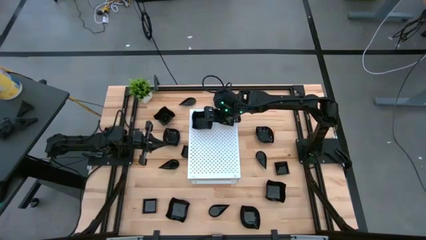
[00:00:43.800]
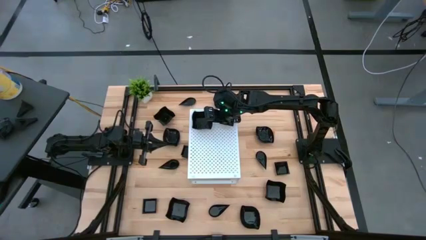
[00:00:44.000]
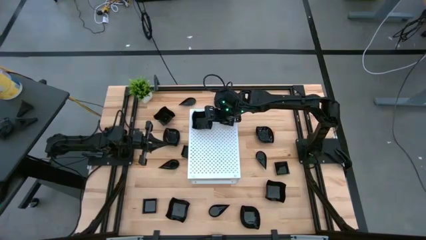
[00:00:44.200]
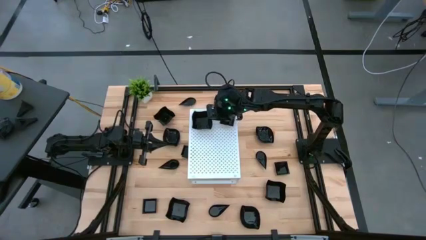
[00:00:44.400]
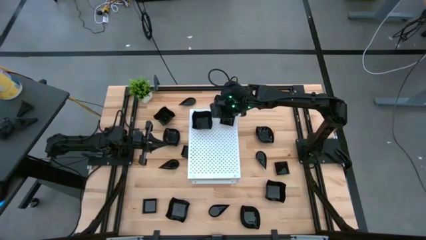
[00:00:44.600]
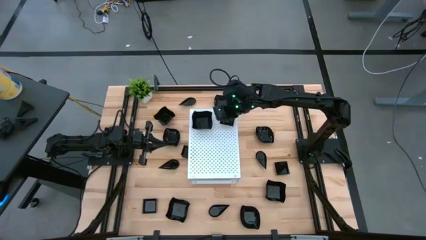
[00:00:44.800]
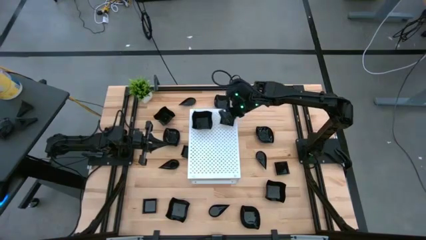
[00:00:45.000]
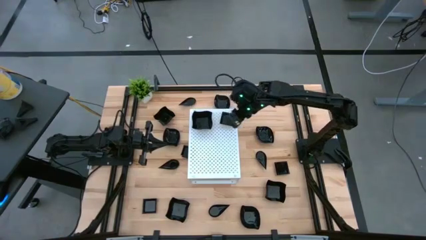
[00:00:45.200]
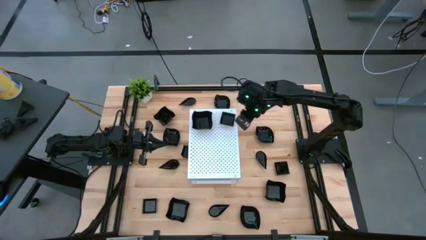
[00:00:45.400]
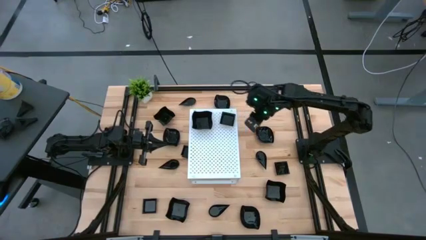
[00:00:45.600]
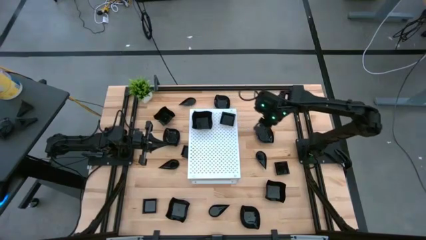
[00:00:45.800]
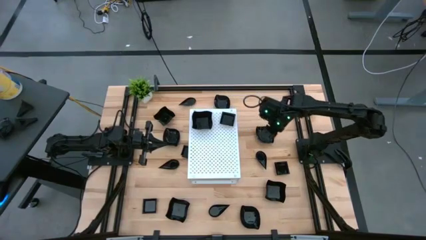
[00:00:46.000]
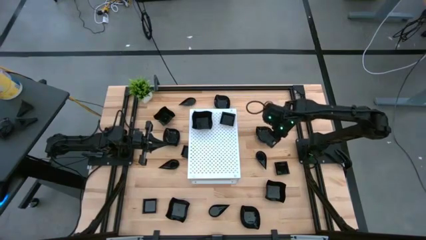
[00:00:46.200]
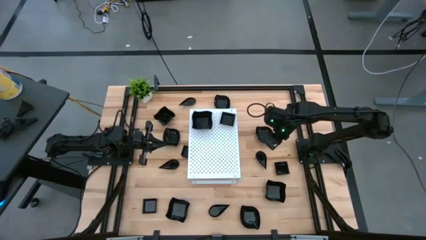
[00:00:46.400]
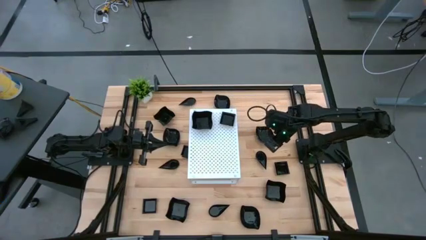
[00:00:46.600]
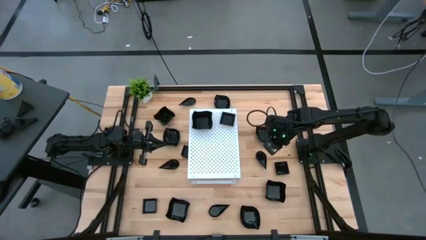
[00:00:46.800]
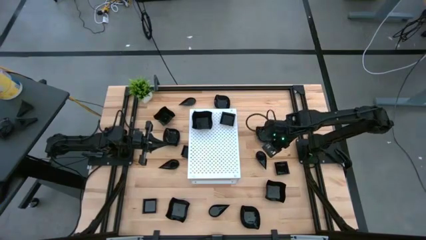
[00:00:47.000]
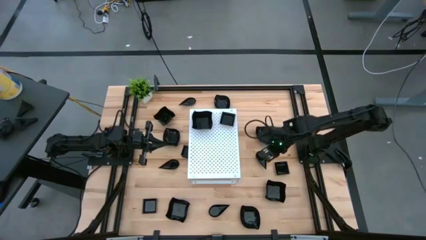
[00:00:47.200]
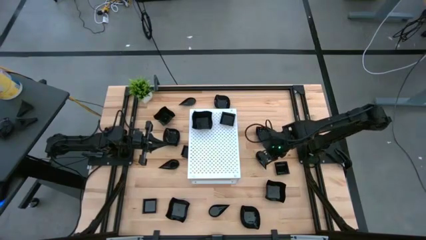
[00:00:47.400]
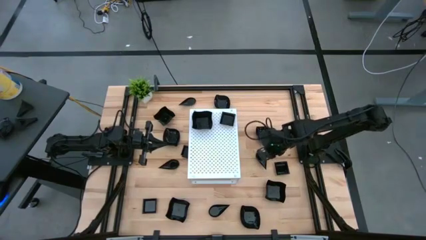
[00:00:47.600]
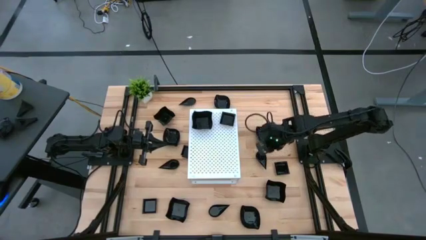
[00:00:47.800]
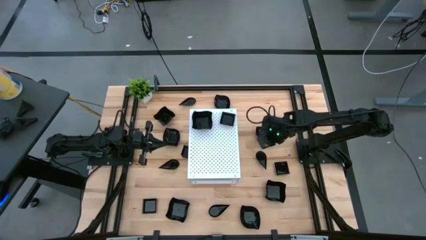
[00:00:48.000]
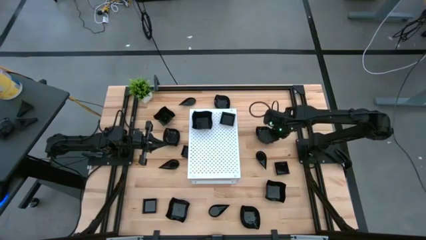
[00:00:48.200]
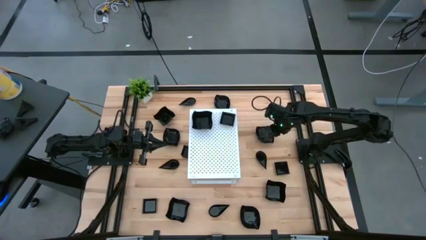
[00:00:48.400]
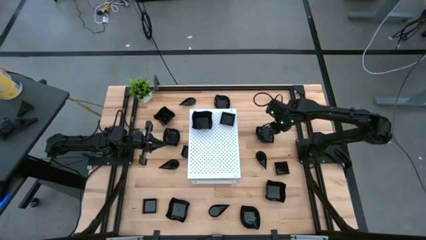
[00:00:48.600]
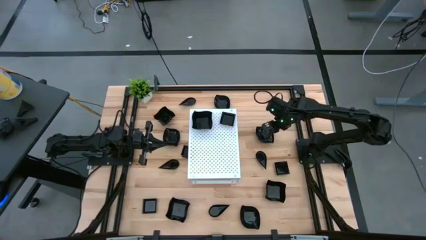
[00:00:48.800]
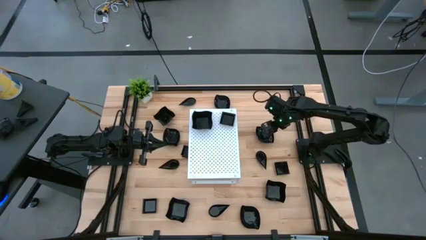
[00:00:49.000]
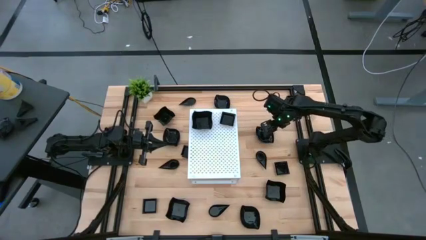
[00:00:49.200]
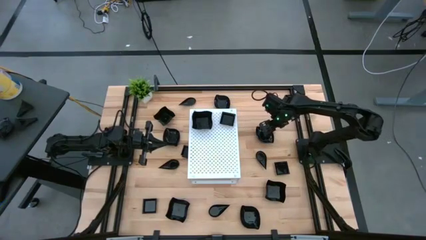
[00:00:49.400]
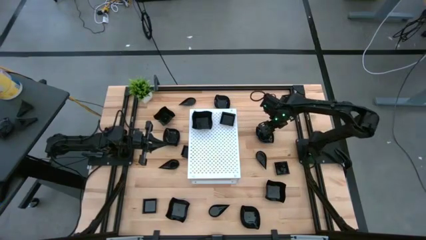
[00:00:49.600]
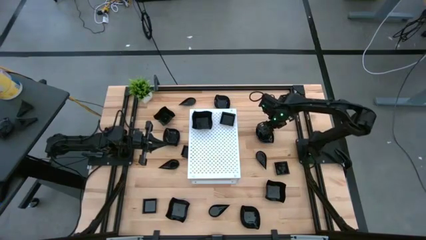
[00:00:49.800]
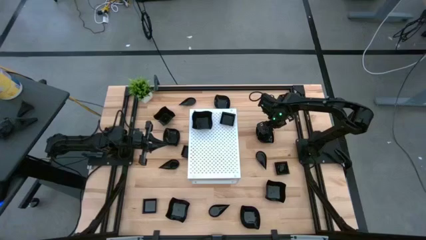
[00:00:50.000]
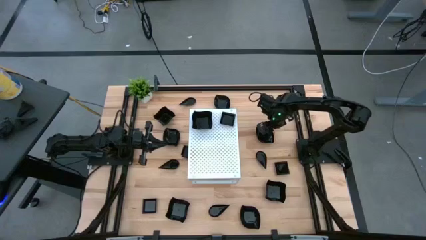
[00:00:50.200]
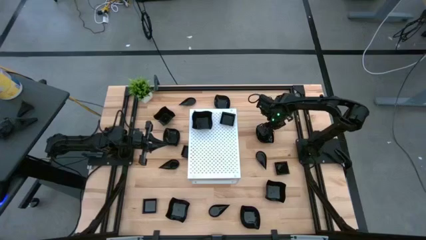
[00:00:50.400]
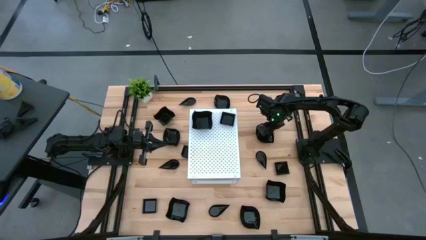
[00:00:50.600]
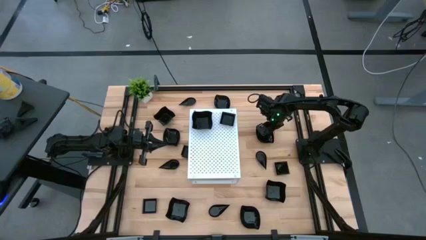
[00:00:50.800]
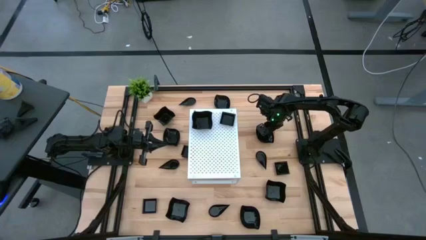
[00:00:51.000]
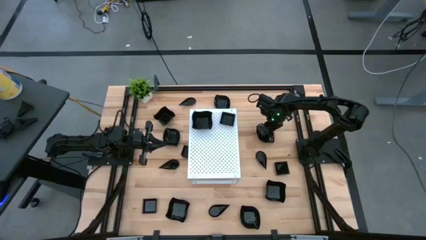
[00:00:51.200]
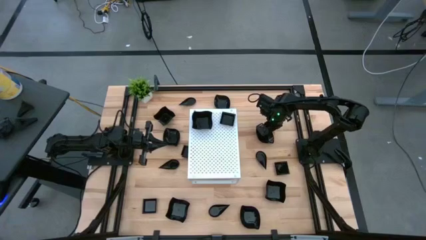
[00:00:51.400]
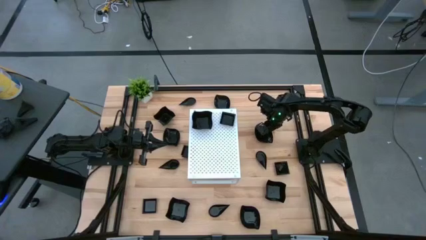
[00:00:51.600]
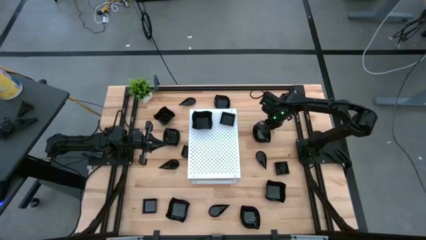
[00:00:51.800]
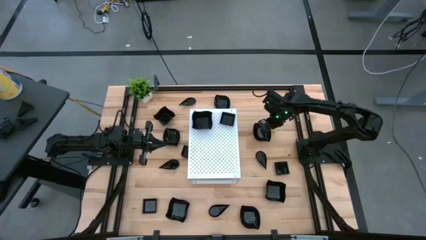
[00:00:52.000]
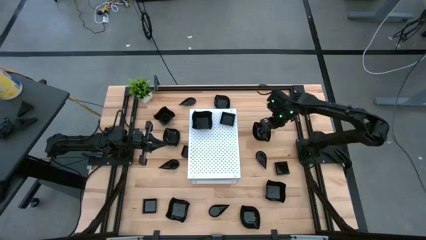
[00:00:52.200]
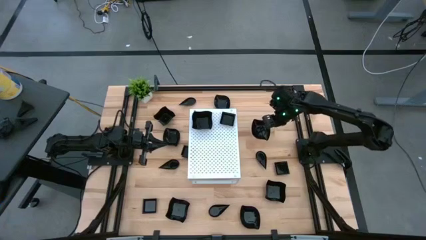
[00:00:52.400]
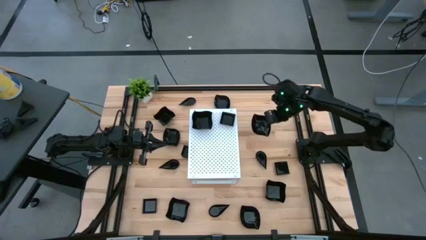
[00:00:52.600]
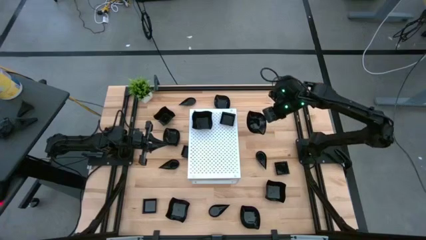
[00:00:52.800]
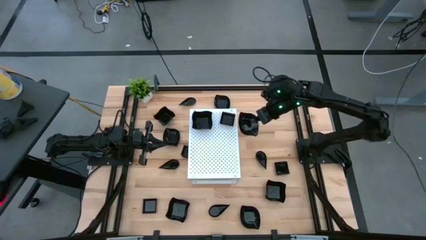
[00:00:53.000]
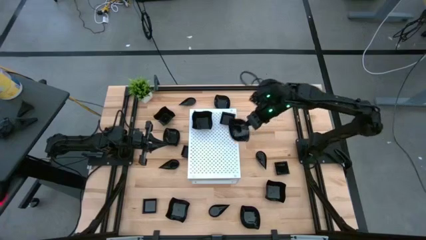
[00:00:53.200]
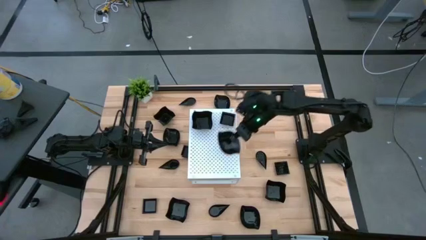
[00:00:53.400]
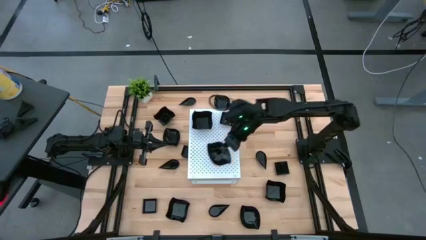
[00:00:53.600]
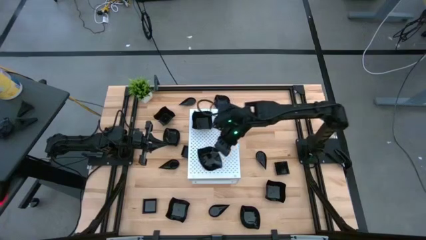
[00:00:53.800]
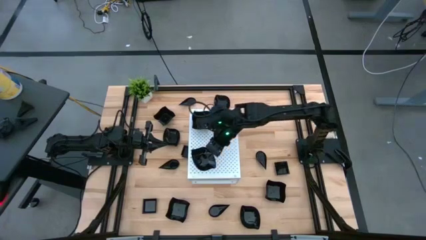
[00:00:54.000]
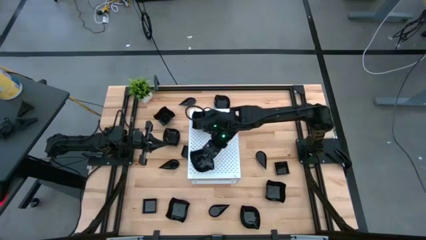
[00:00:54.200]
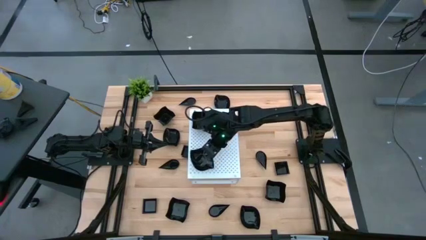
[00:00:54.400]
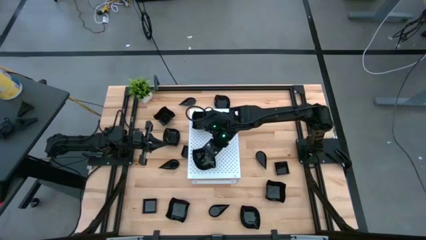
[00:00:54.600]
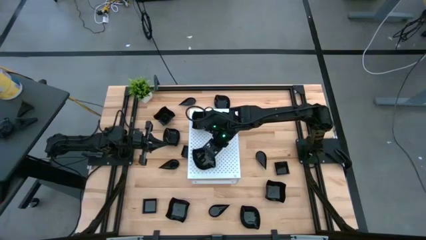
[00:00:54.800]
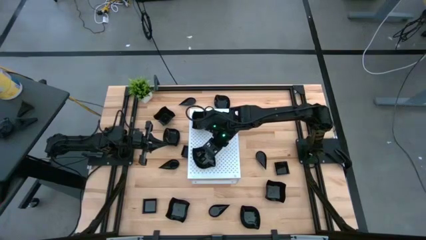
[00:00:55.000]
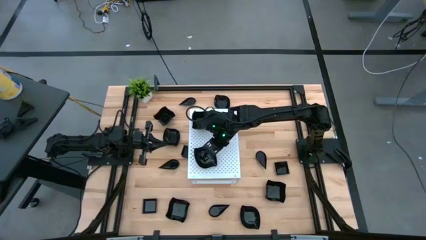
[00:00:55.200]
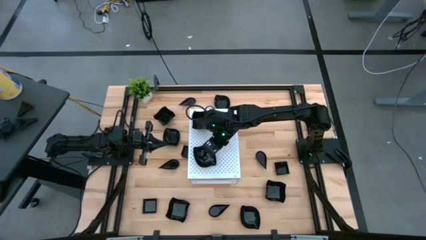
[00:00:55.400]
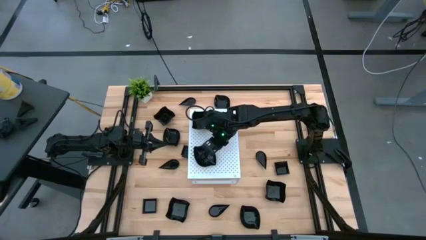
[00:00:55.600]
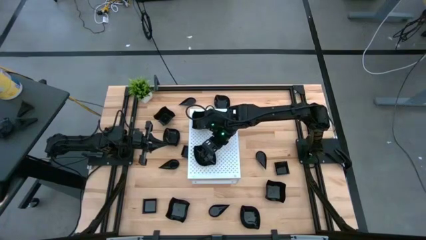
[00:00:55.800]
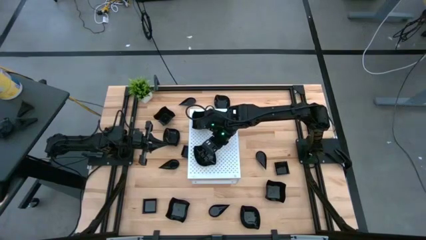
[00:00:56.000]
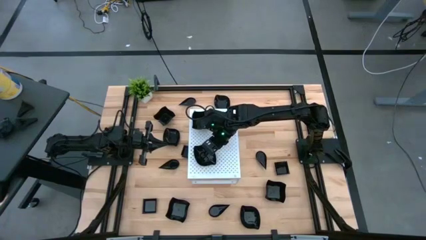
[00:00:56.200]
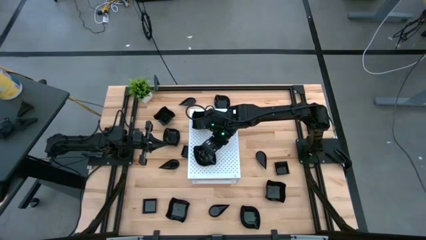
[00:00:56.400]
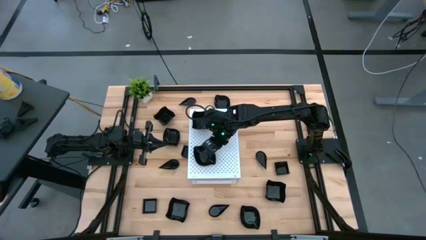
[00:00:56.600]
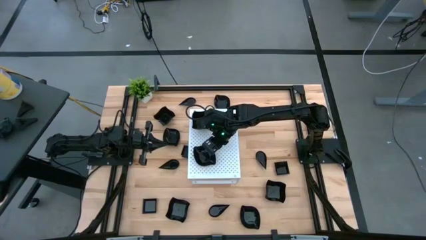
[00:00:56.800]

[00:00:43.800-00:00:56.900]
Task: Pick & Place Mini shaped plates
Put the black leaf shaped plate on the shelf
